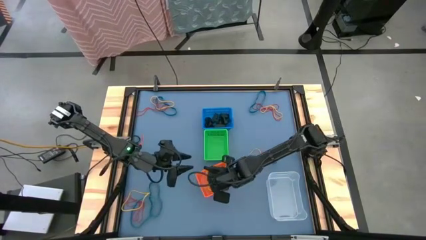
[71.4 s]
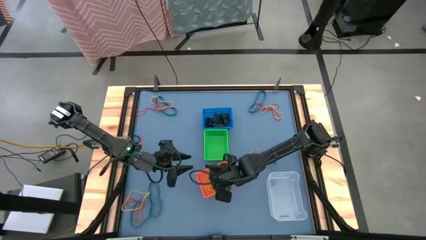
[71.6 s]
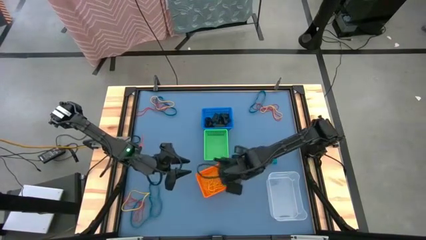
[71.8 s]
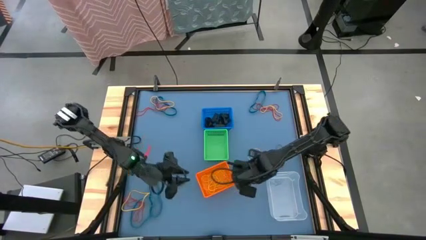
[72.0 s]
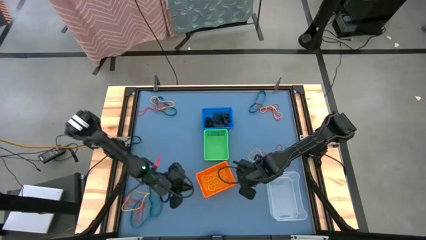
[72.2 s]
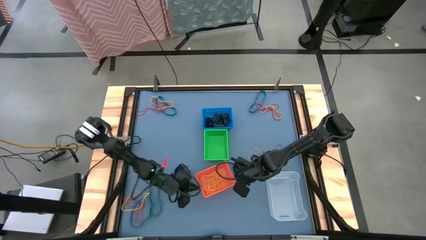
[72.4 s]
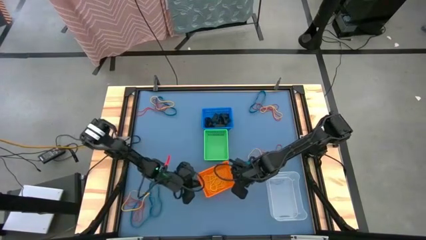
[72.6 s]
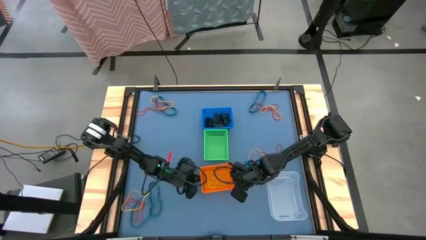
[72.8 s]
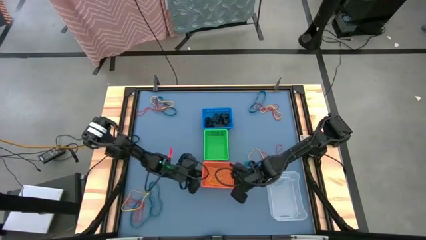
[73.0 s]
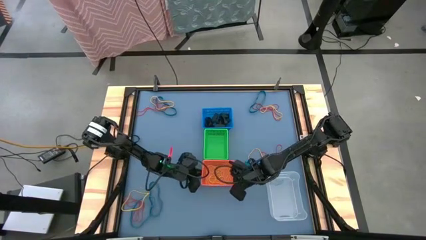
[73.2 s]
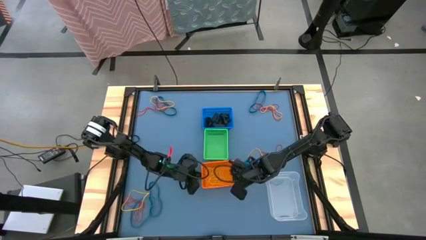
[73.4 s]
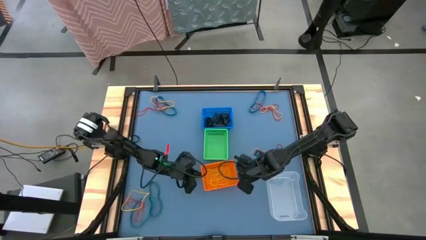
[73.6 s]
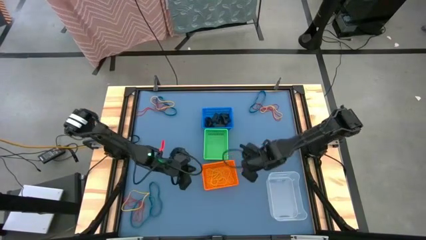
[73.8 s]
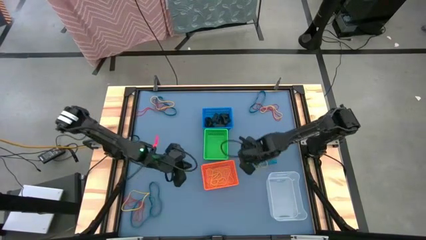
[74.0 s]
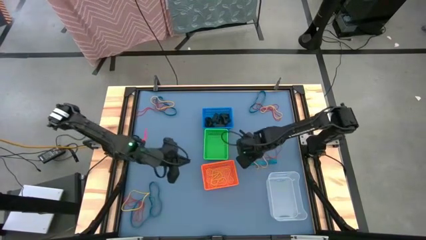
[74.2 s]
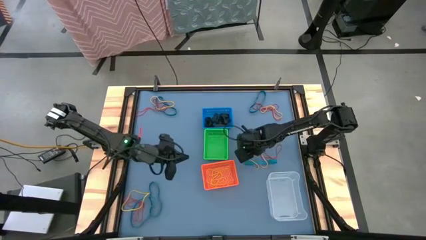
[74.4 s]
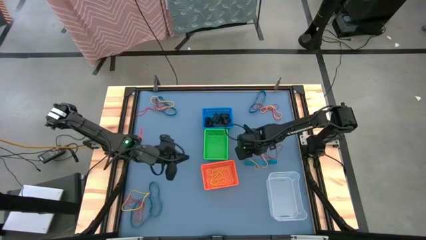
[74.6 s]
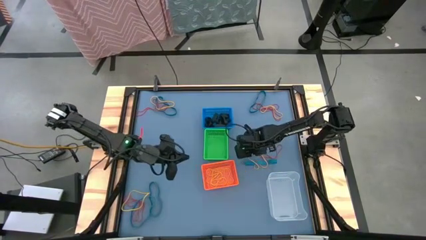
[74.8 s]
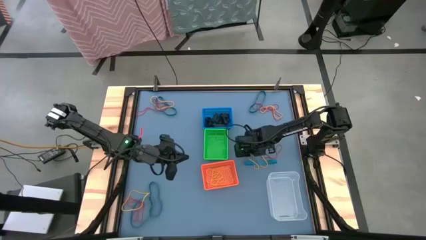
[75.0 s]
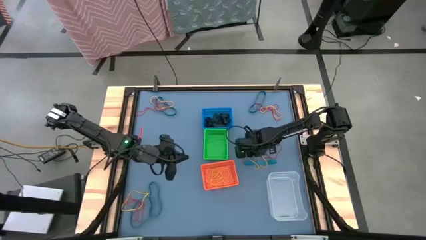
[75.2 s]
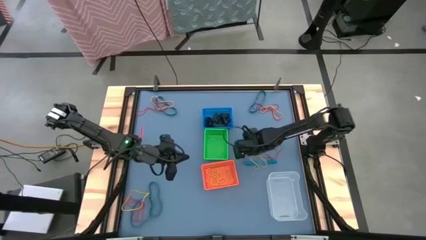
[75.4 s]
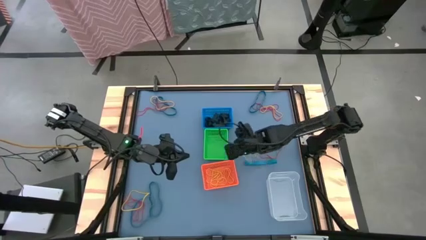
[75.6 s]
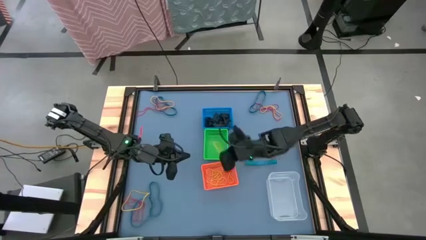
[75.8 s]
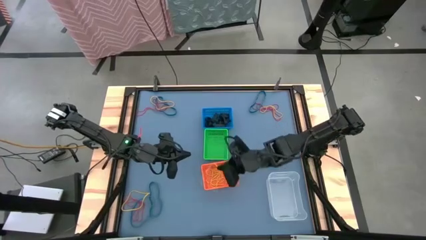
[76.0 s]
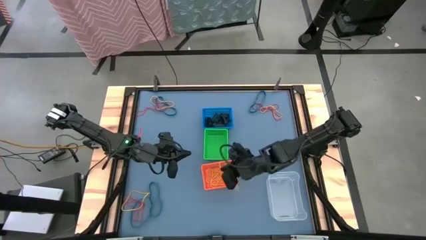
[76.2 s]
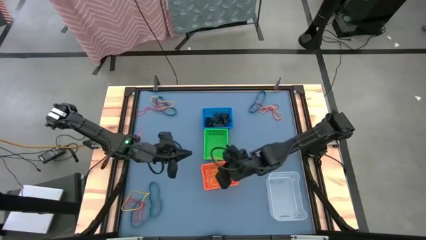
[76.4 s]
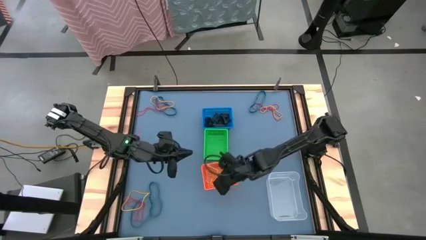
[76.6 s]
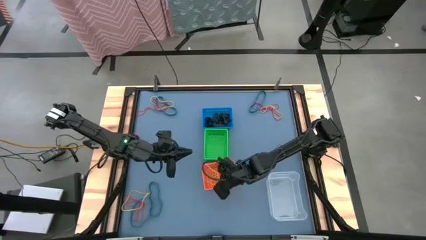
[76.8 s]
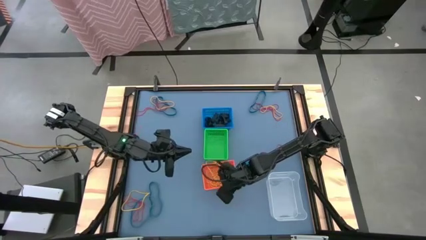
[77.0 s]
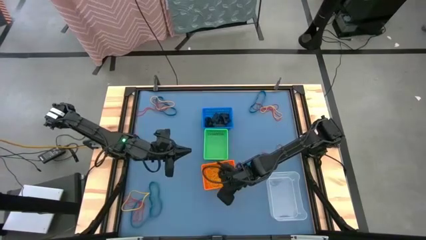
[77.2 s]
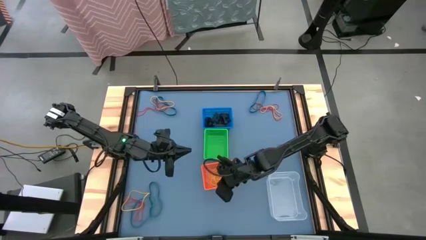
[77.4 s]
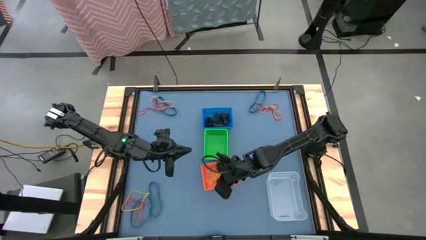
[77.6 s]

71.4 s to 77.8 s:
Task: Sort rubber bands into baskets
Put the yellow rubber band into the orange bin

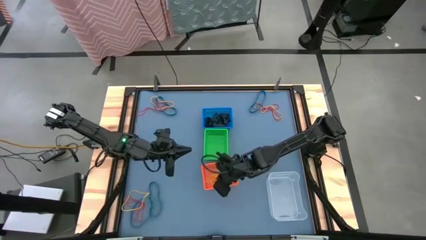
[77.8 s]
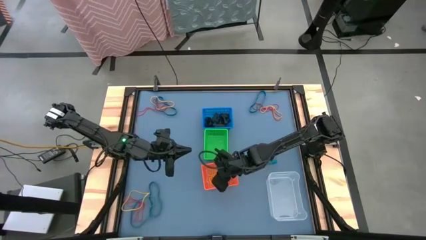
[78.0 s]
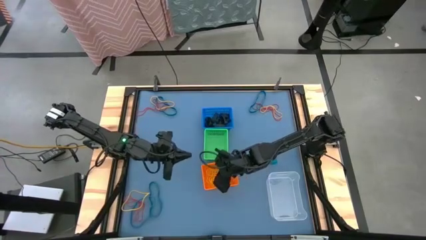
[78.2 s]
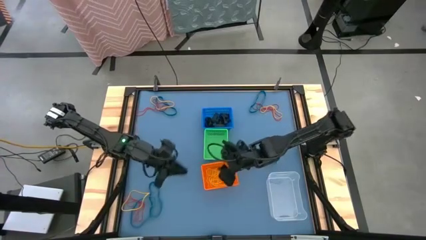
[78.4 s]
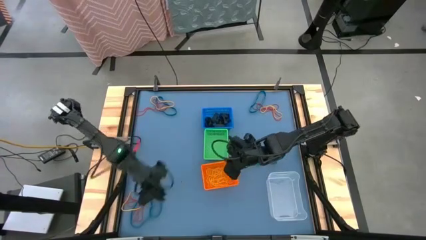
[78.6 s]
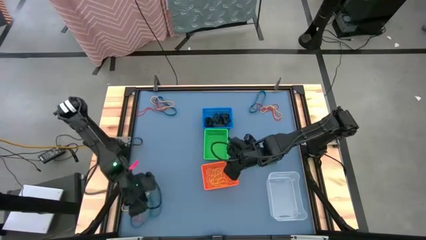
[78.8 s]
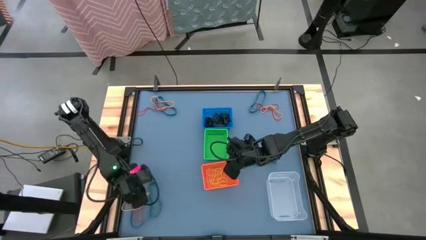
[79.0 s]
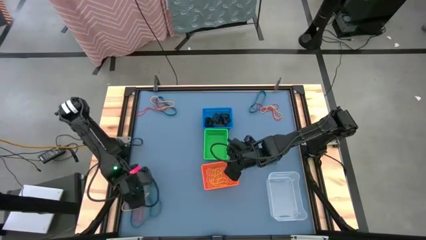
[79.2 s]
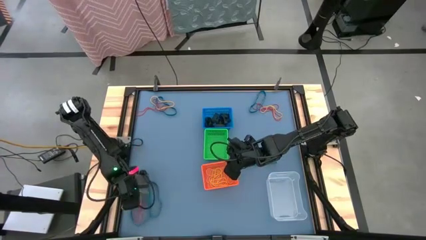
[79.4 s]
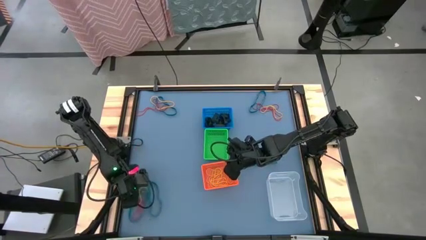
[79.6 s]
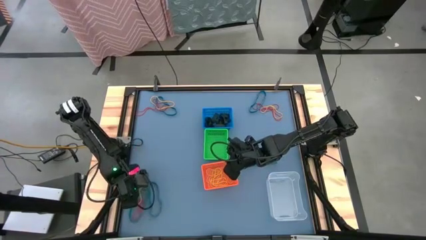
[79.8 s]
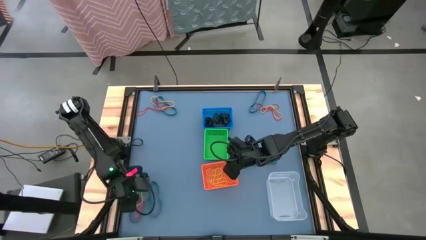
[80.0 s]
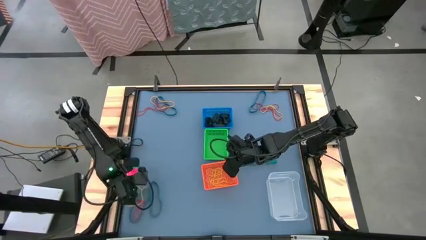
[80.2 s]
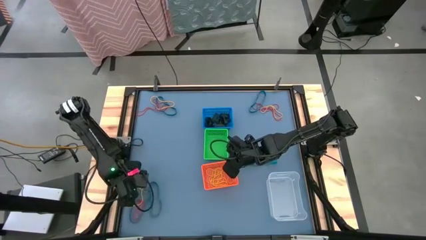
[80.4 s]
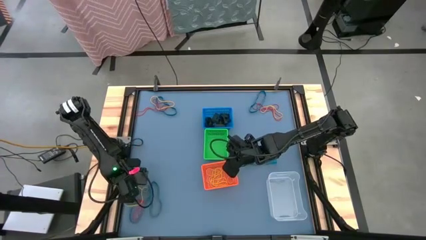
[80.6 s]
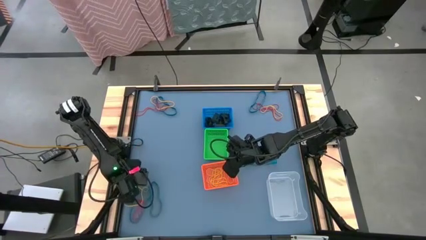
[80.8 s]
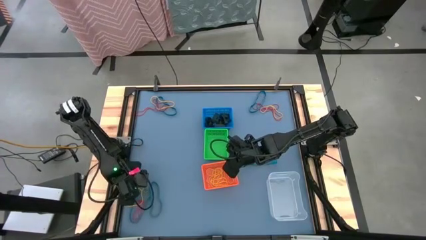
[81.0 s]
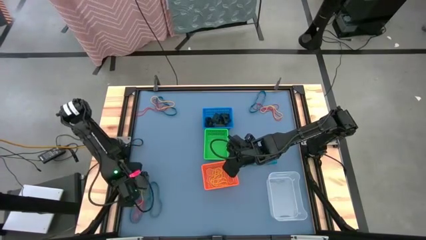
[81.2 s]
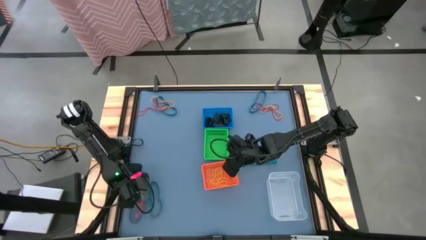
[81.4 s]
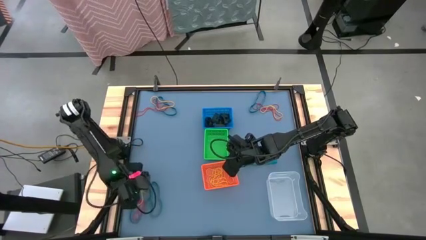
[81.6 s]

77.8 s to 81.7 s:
Put the yellow rubber band into the orange bin

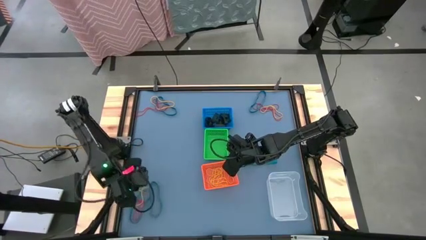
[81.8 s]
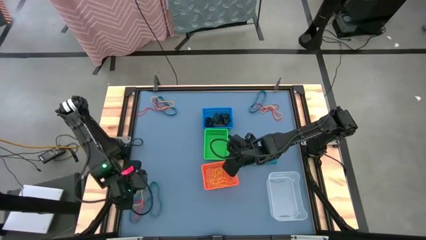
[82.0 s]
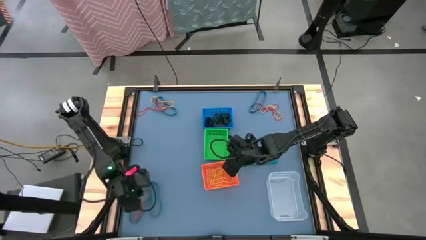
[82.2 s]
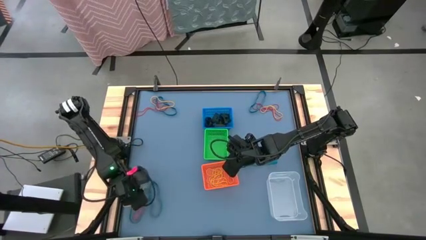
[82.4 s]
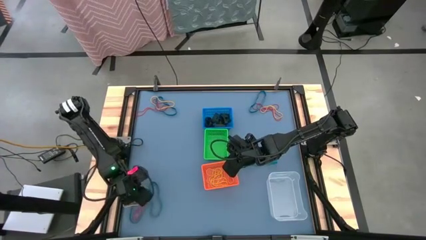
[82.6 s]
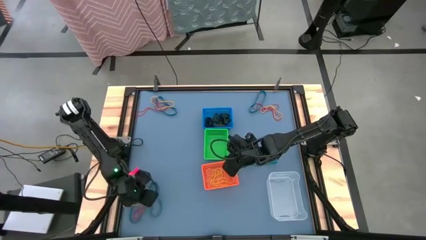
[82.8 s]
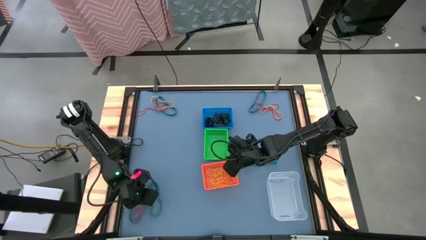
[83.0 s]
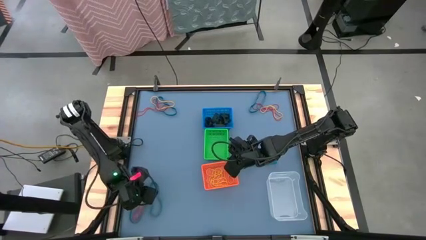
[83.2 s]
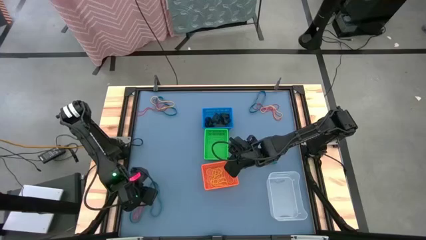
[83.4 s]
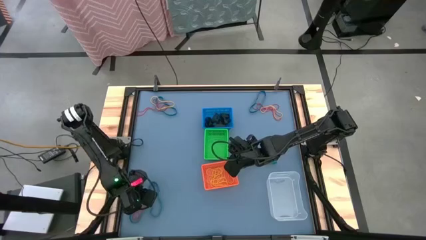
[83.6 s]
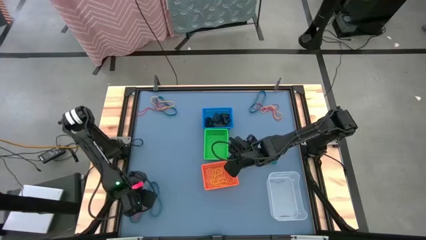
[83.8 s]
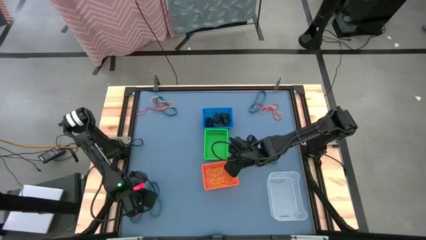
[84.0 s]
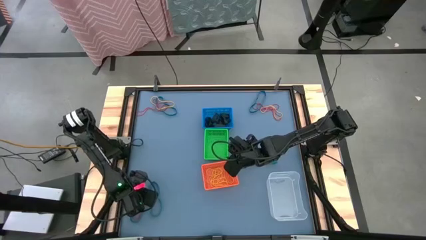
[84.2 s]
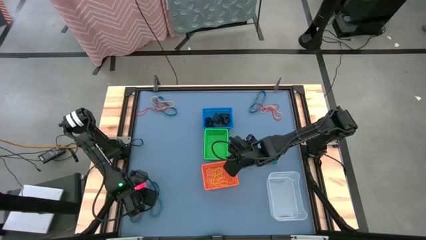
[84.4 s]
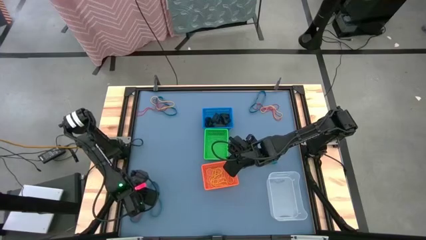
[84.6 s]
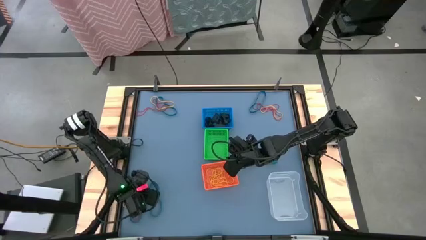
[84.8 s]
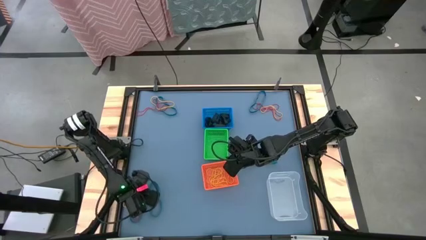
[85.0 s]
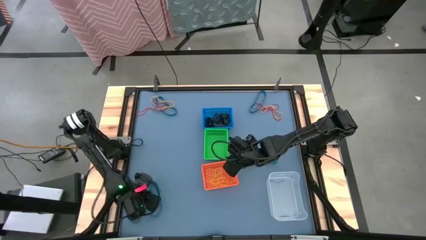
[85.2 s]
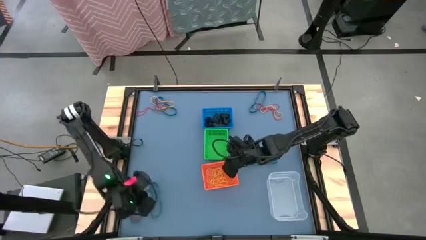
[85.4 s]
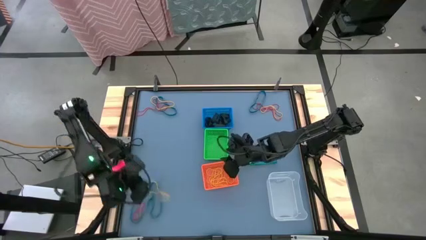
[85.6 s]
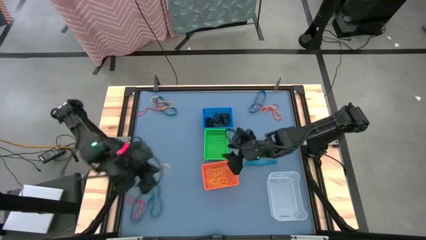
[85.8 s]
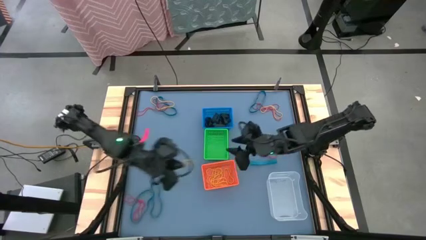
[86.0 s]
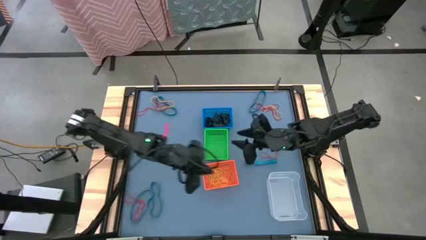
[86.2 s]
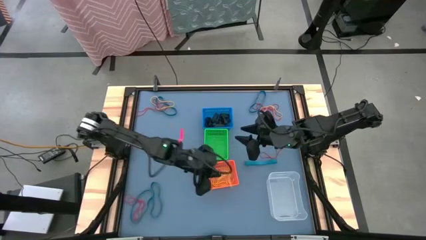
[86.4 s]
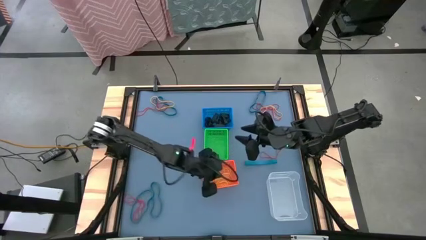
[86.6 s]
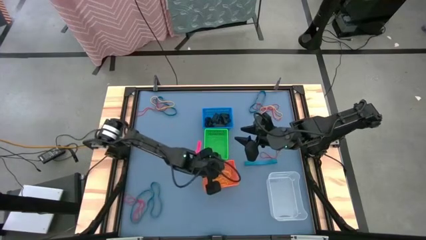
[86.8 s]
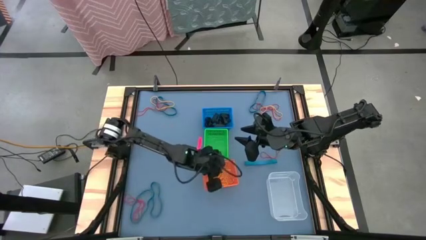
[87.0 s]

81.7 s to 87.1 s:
Put the yellow rubber band into the orange bin

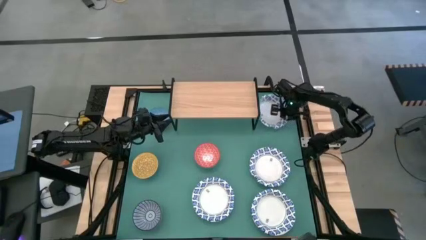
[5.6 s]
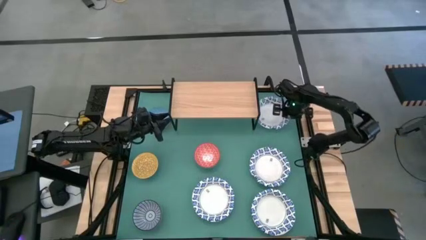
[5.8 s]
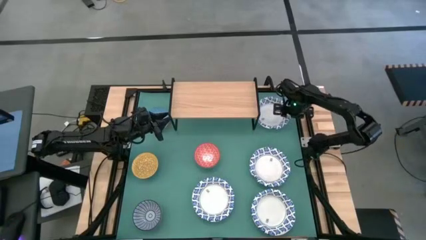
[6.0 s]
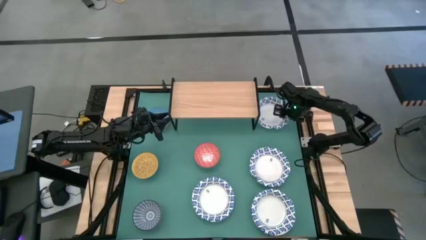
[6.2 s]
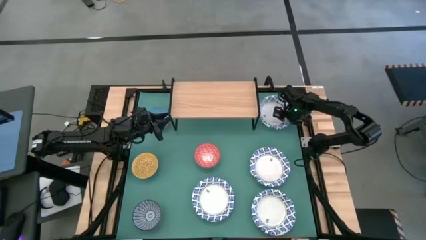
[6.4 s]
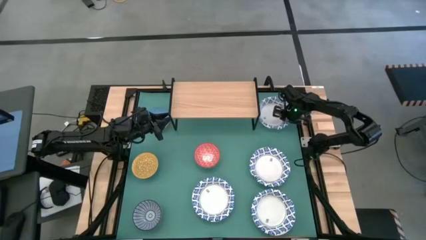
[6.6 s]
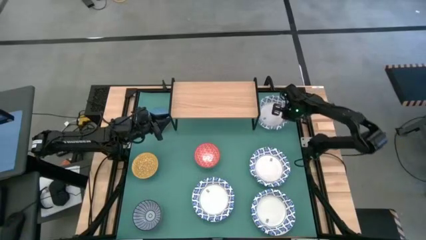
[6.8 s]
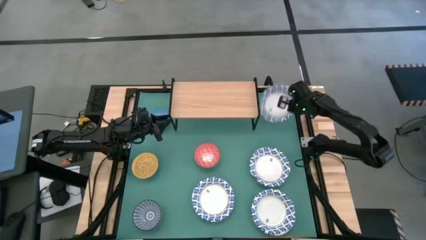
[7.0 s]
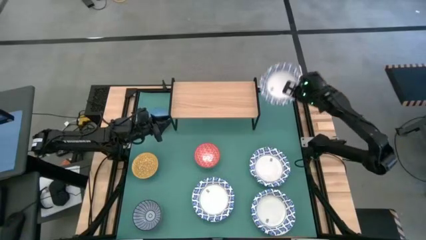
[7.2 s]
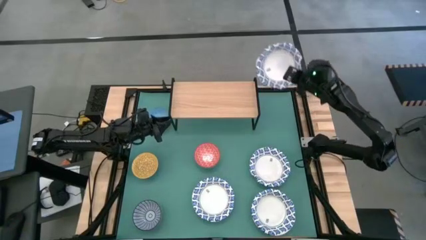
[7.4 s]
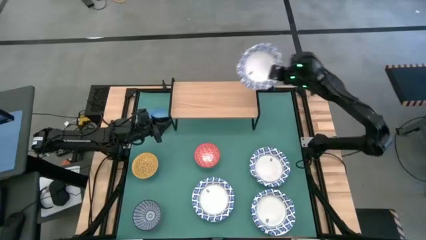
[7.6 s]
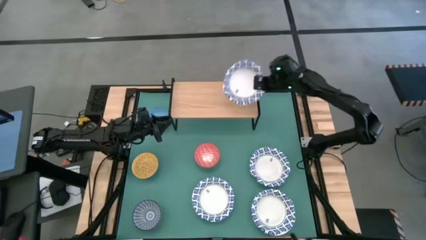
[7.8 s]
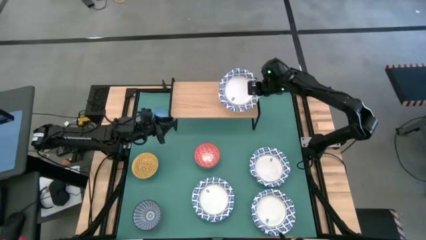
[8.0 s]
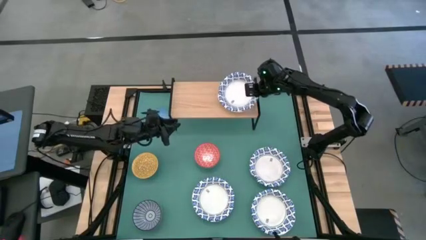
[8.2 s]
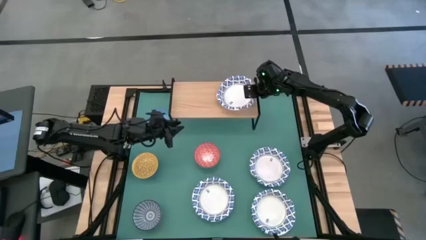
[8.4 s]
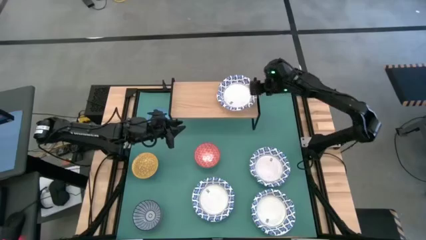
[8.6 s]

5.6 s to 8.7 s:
Task: Place and stack bowls onto a shelf
Put the white patterned bowl on the shelf
